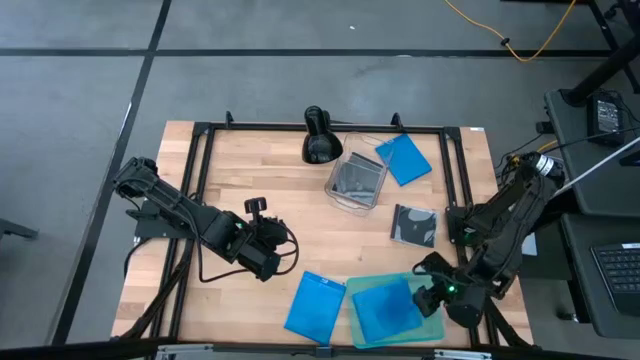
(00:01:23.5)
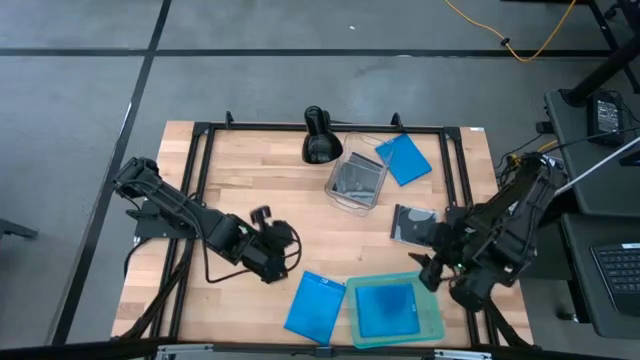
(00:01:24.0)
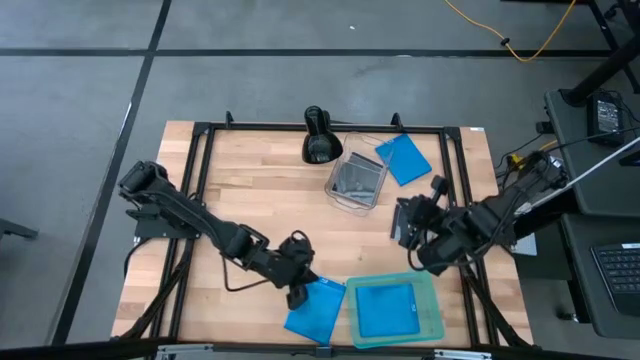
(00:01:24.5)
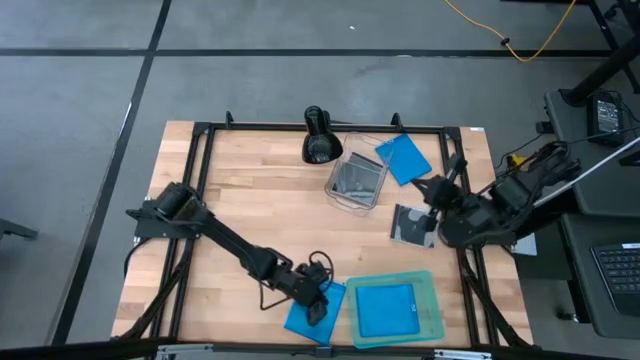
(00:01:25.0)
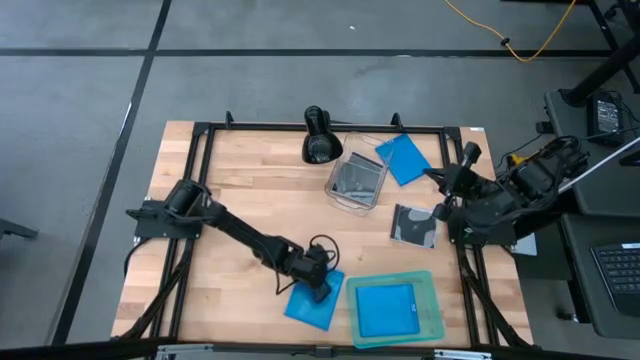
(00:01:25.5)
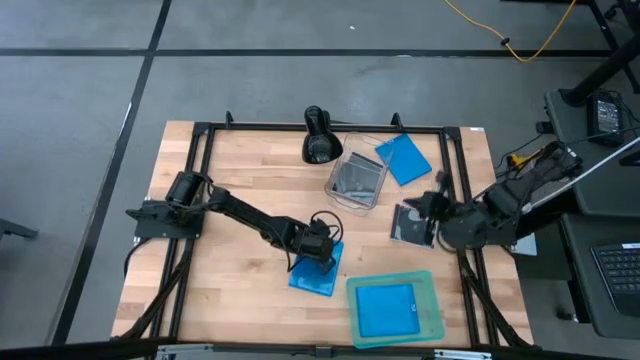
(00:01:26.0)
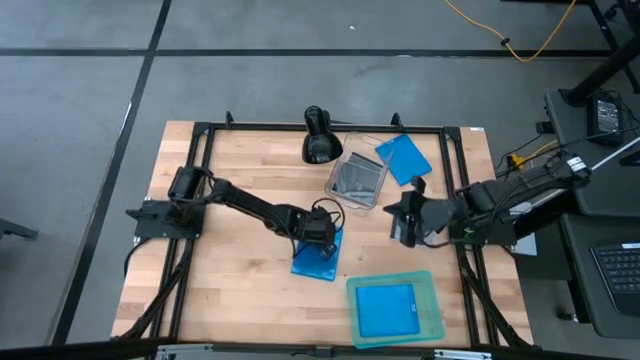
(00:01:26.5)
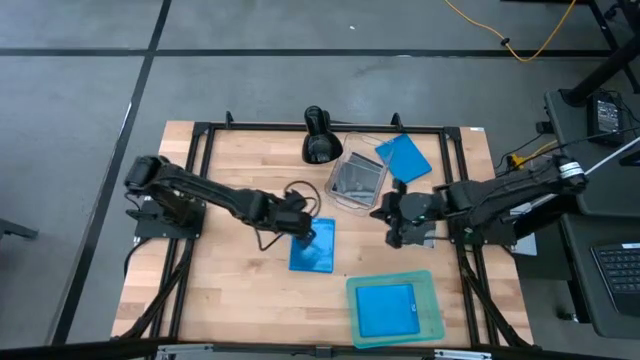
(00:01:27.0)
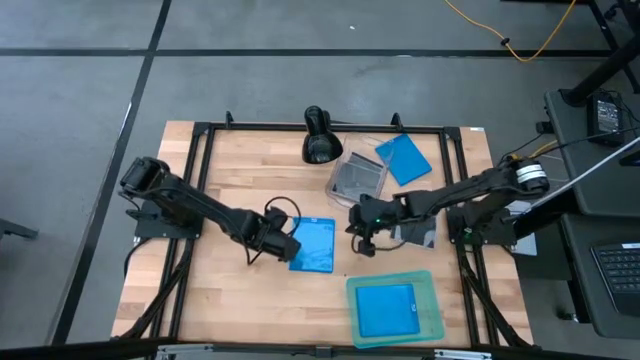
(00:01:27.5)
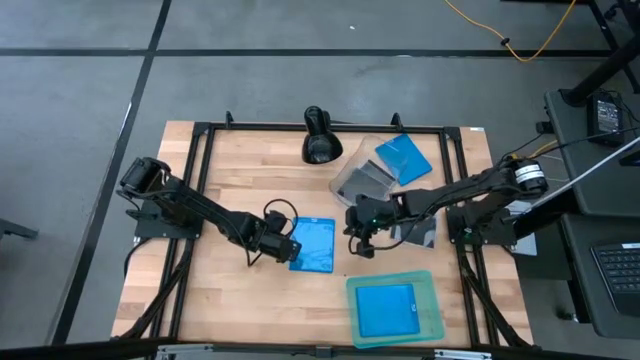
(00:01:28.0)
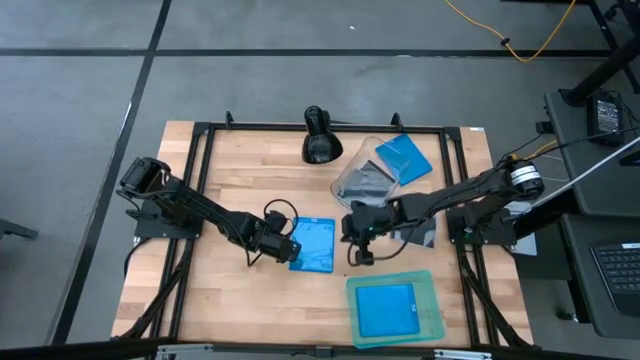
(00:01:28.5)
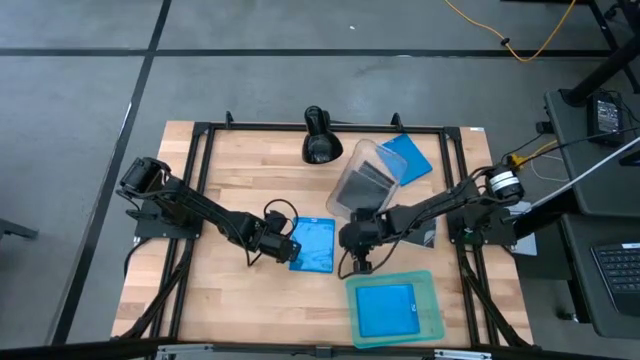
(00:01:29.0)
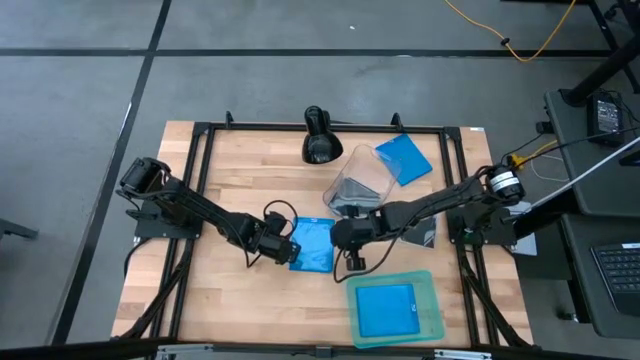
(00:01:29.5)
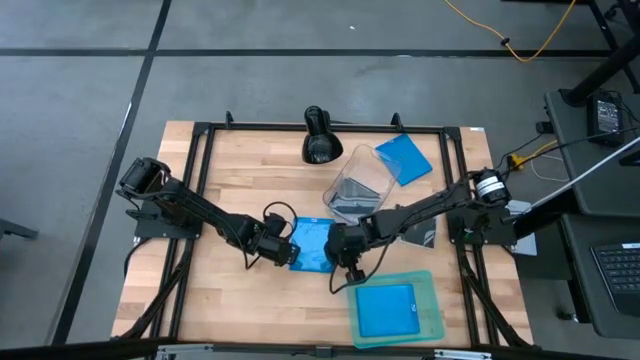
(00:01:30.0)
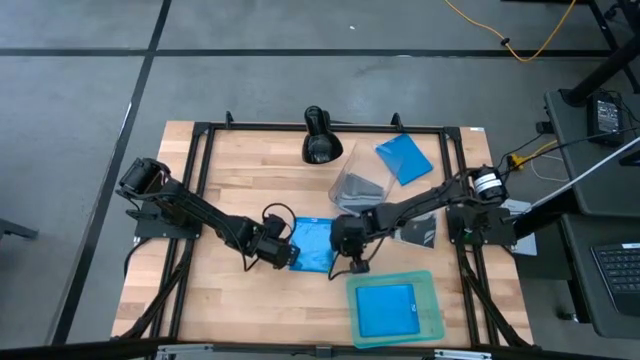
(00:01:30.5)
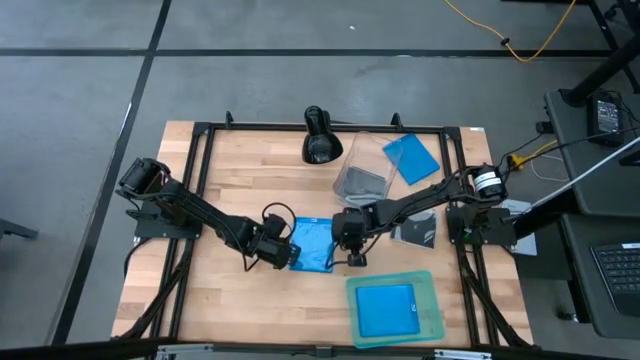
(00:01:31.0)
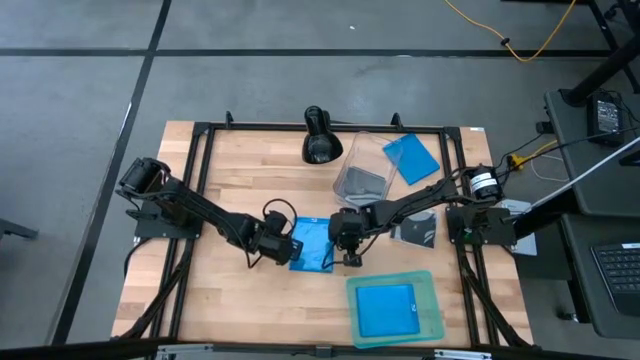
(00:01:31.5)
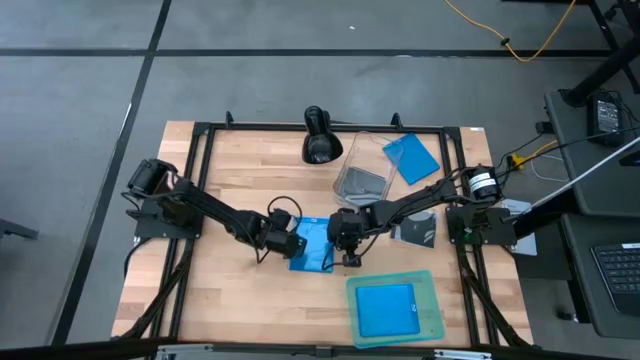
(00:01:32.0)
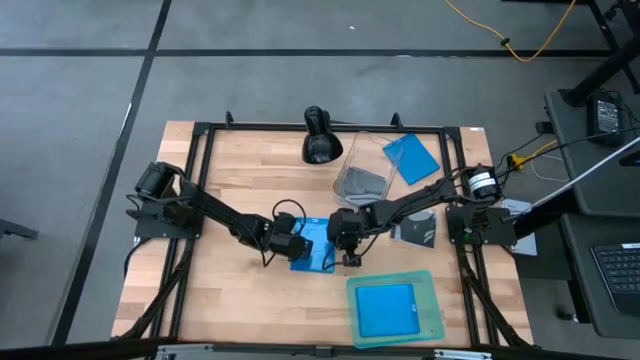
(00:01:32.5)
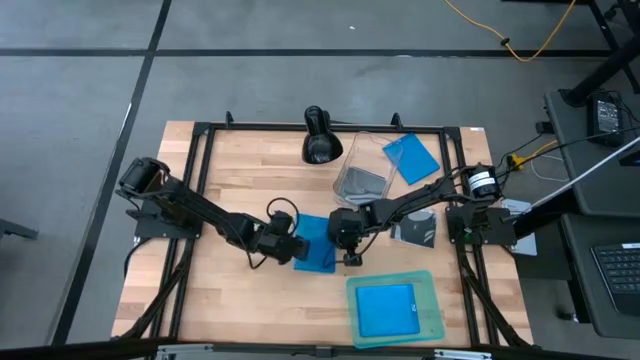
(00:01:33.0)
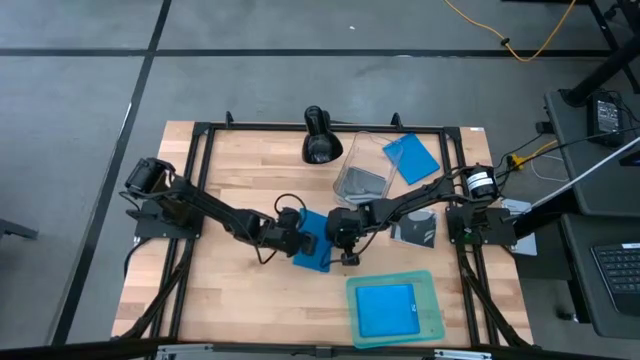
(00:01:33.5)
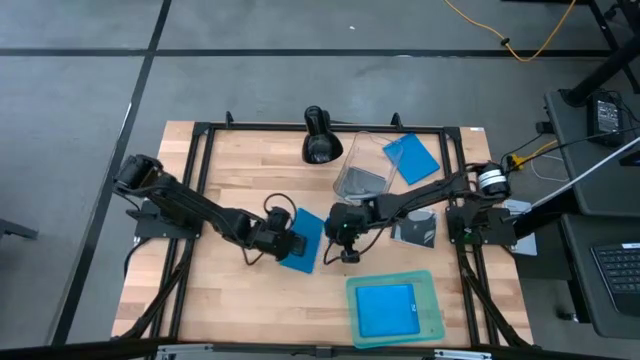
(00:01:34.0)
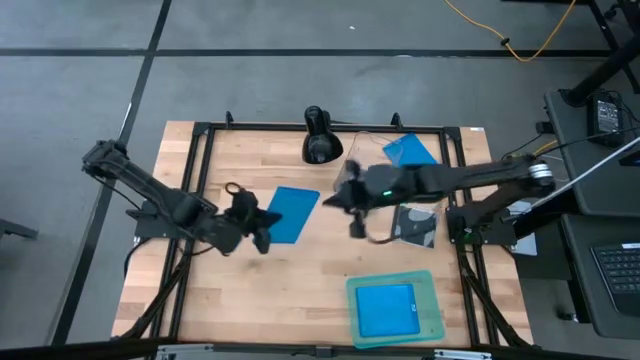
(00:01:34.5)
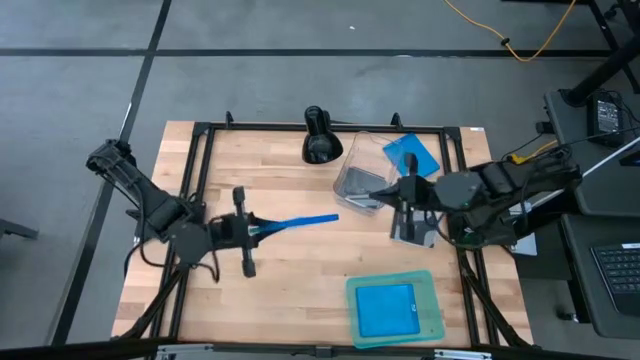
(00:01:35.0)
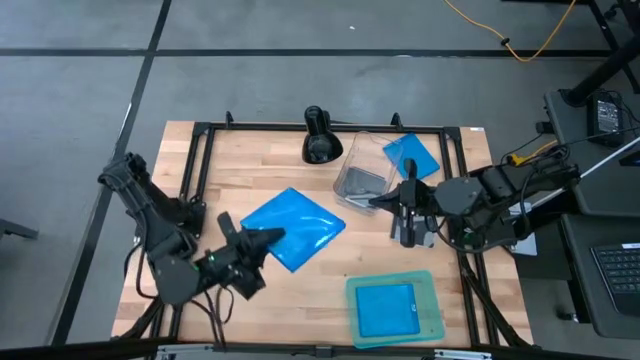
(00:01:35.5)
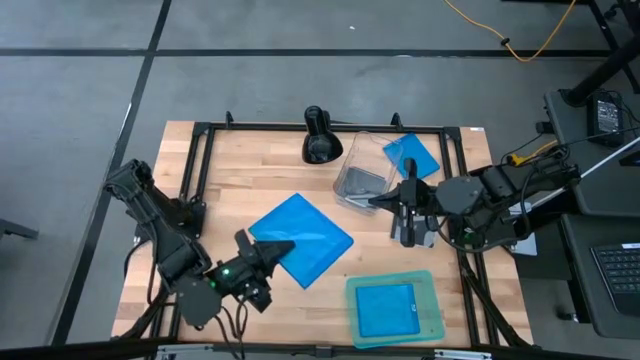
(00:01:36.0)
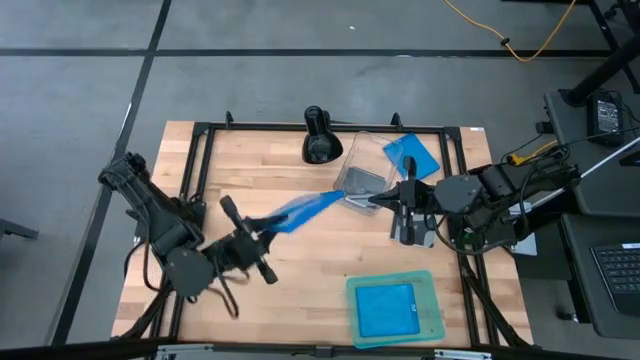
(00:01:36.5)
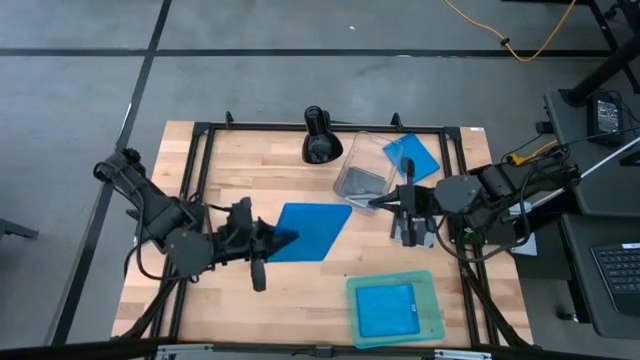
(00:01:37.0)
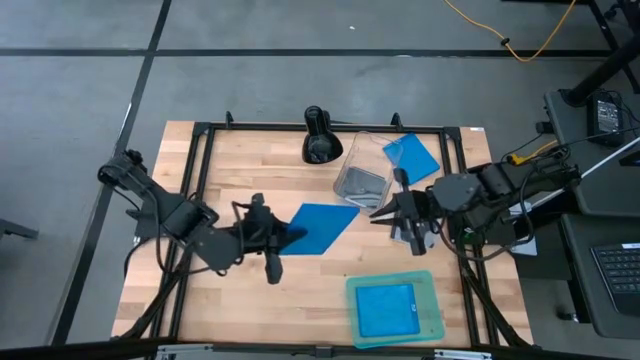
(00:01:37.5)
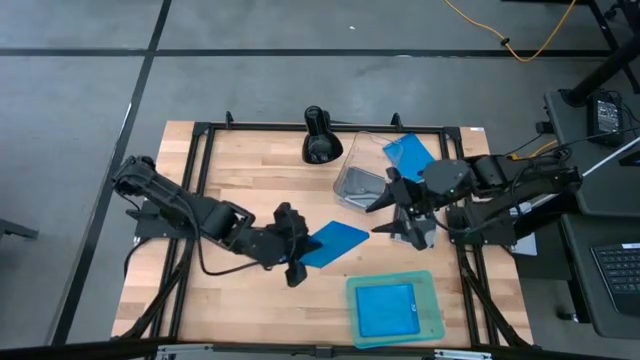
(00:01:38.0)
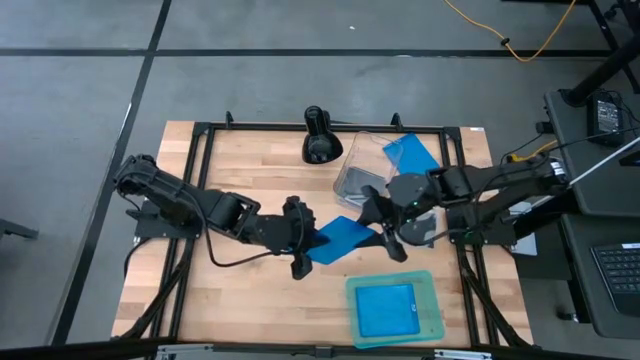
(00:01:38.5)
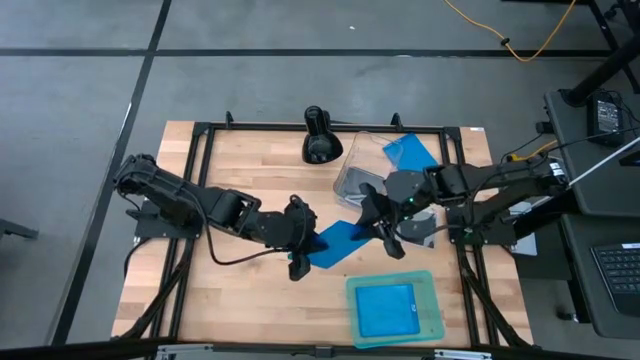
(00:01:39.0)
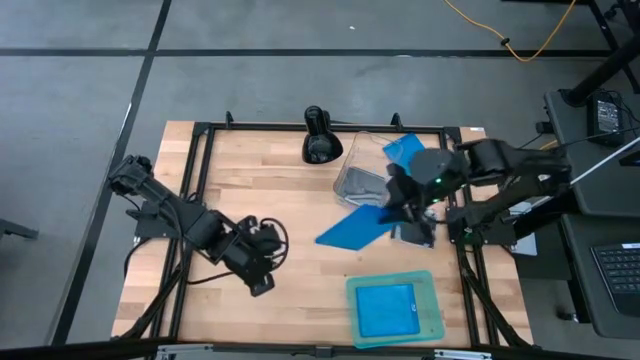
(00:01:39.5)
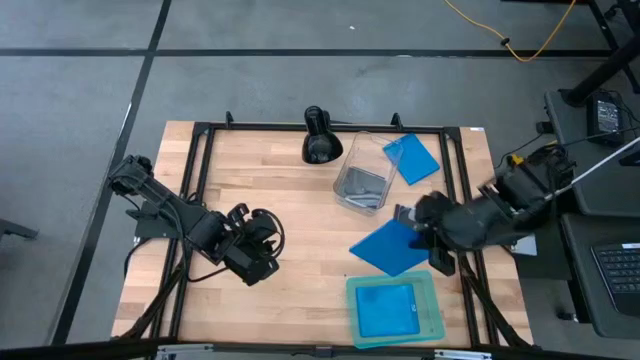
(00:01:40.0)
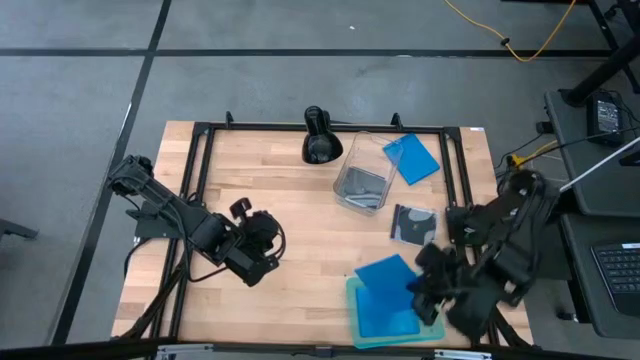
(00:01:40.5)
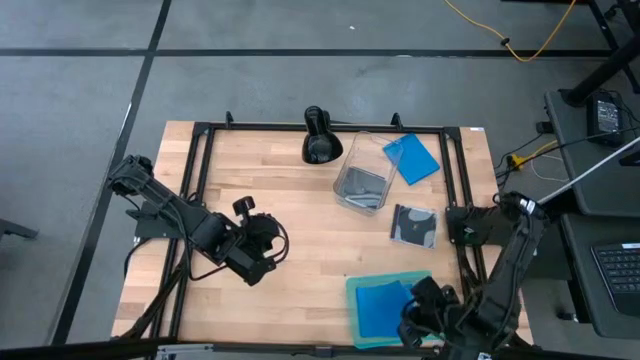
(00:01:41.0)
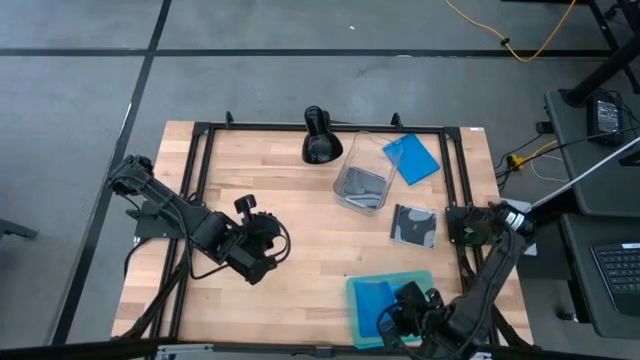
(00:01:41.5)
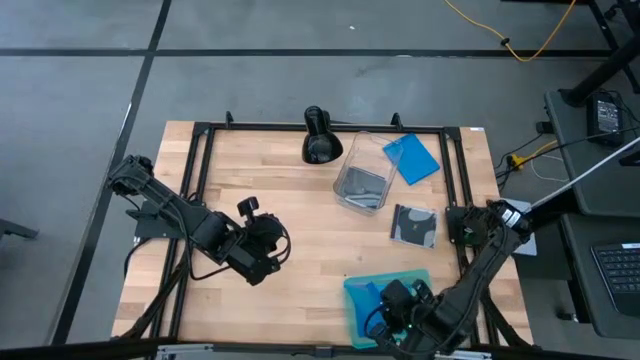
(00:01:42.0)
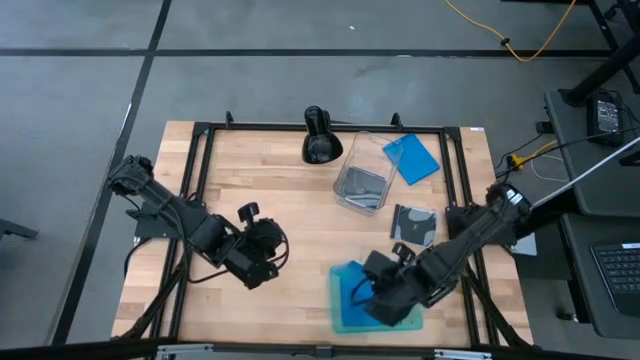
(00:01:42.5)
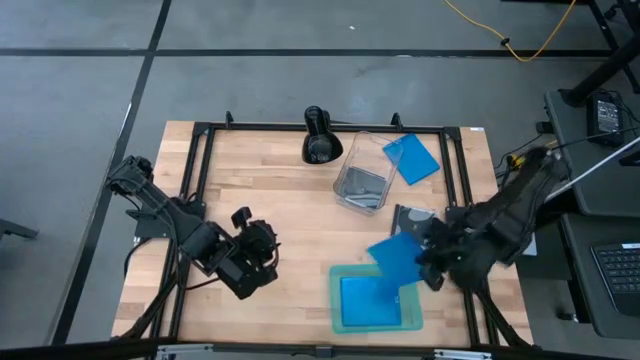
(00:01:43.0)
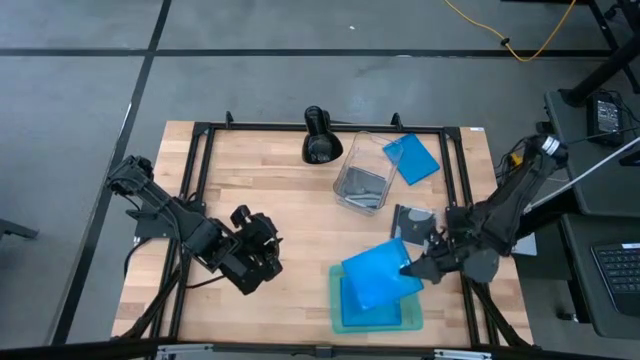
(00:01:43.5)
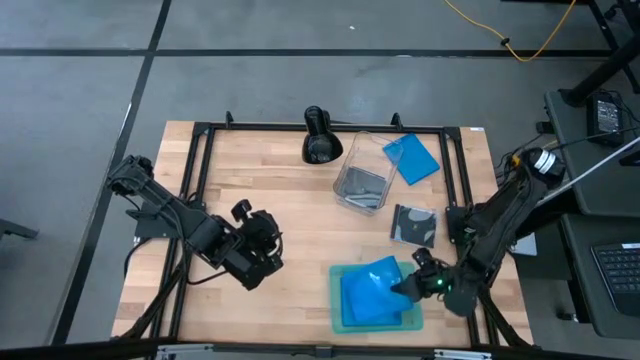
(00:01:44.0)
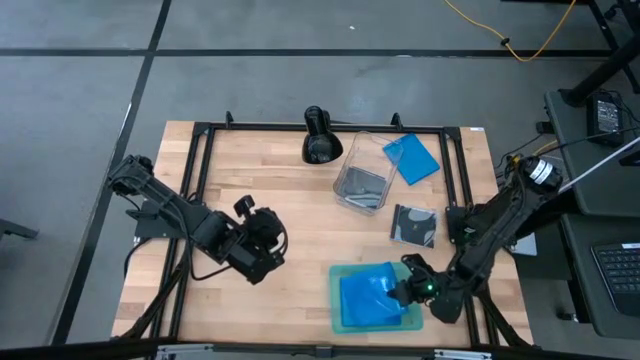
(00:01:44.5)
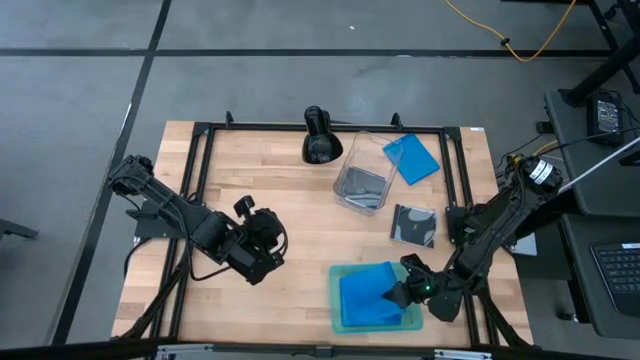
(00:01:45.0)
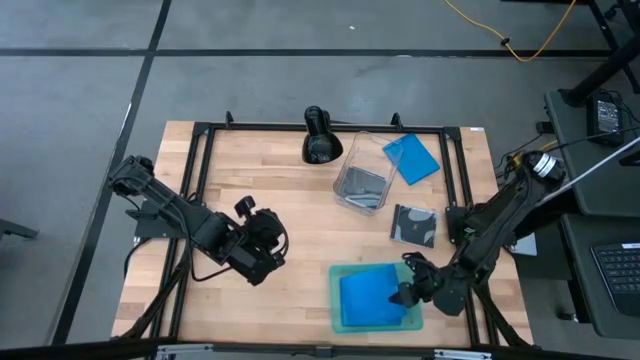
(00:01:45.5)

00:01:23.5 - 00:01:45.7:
Task: Pick & place jewel cases by type
Put the bottom blue CD case into the light green bin
